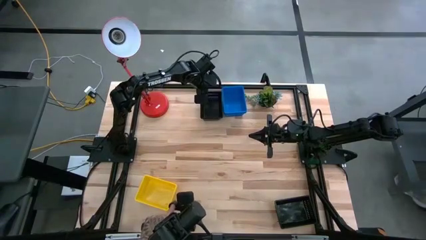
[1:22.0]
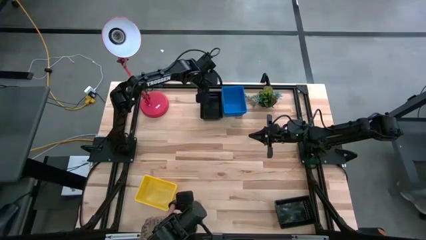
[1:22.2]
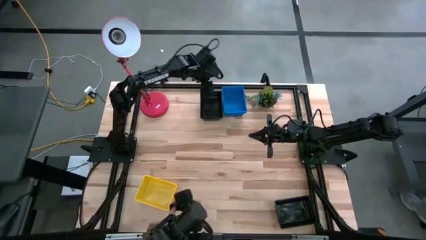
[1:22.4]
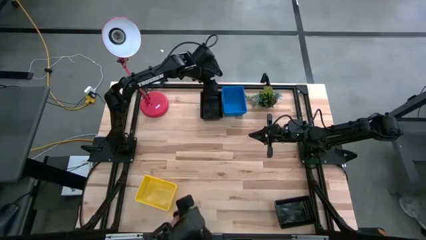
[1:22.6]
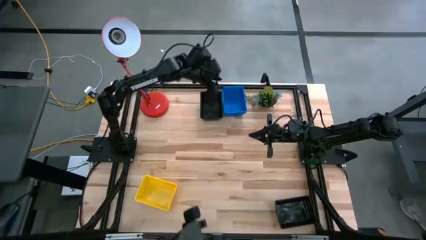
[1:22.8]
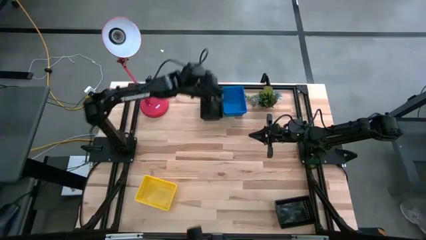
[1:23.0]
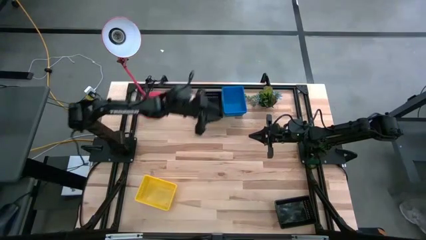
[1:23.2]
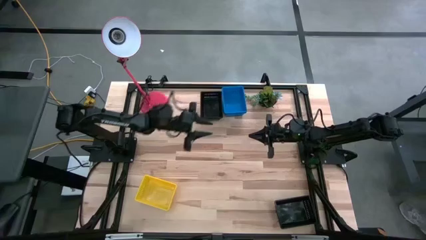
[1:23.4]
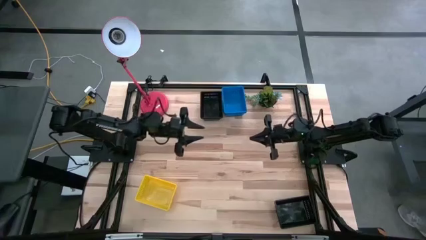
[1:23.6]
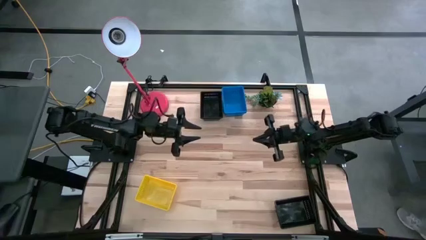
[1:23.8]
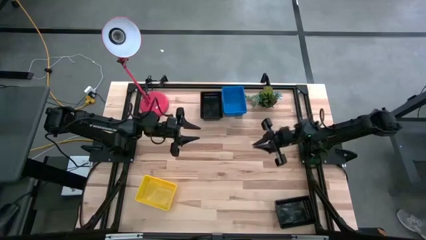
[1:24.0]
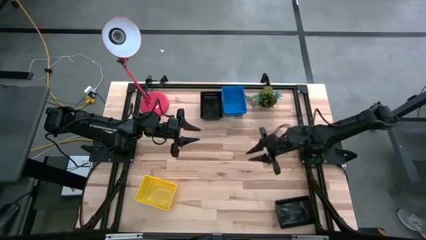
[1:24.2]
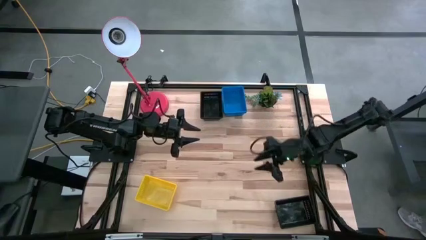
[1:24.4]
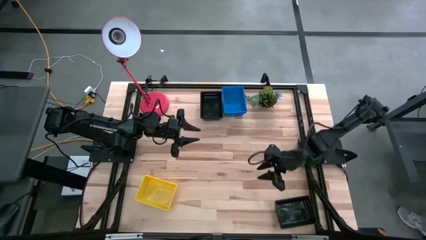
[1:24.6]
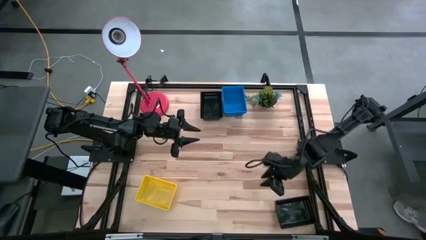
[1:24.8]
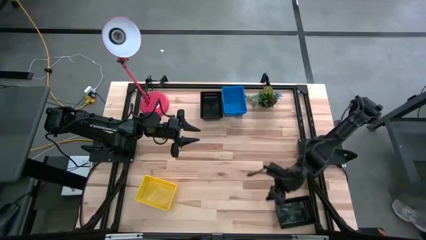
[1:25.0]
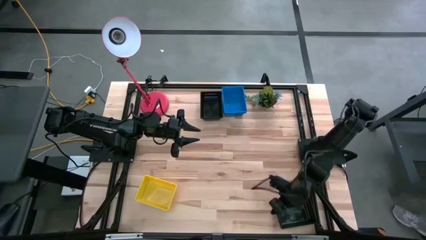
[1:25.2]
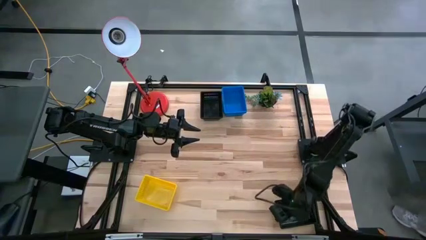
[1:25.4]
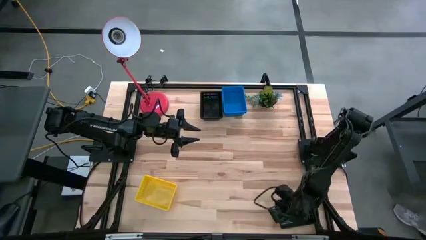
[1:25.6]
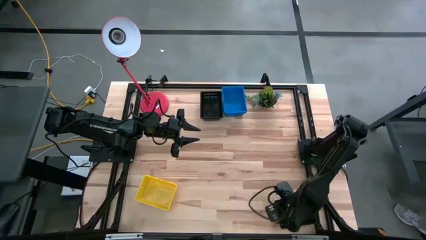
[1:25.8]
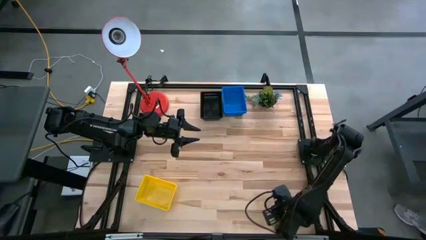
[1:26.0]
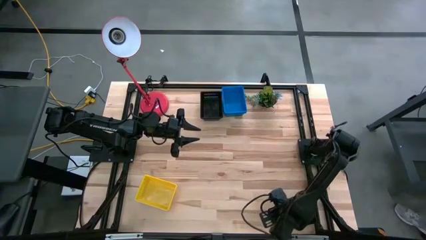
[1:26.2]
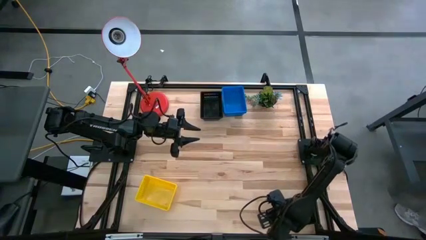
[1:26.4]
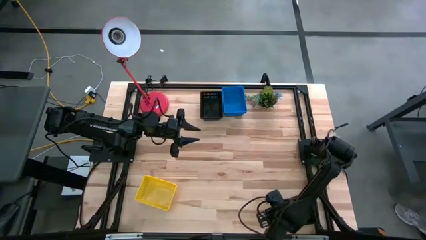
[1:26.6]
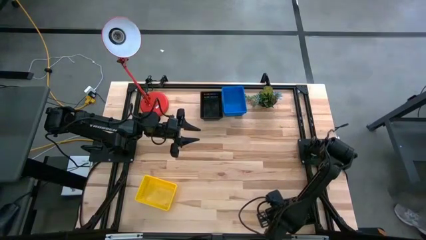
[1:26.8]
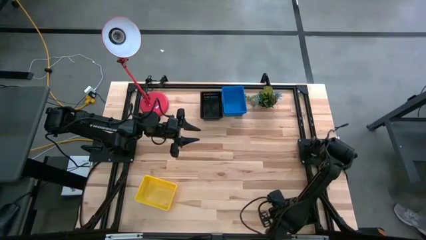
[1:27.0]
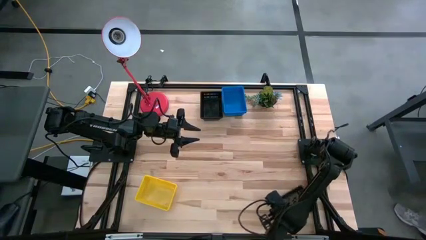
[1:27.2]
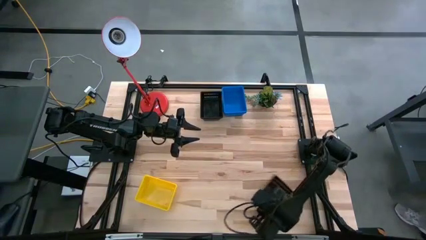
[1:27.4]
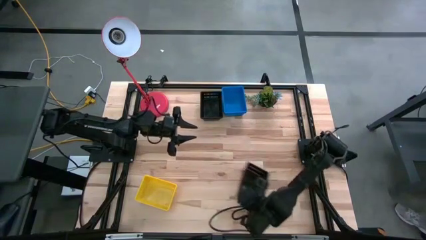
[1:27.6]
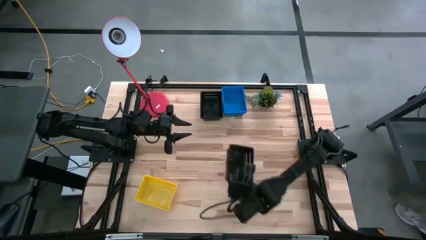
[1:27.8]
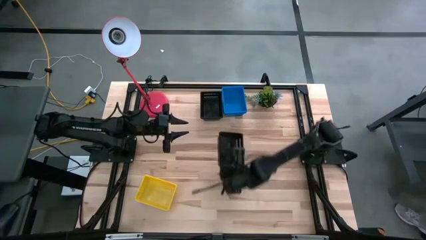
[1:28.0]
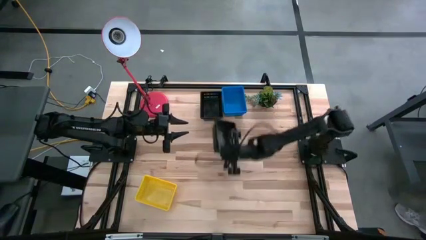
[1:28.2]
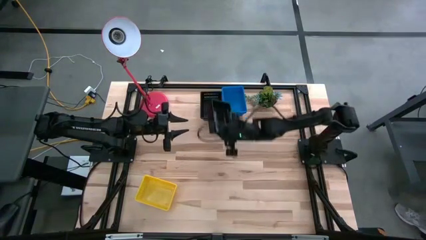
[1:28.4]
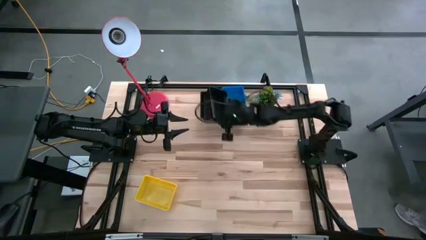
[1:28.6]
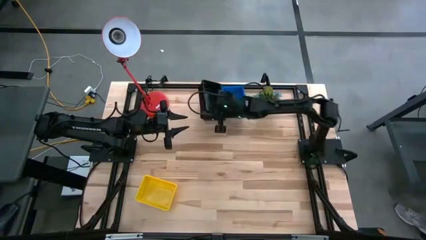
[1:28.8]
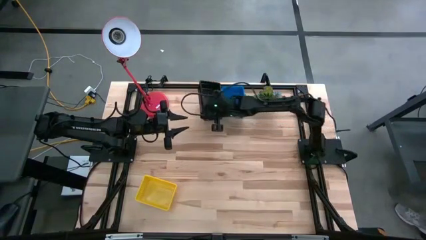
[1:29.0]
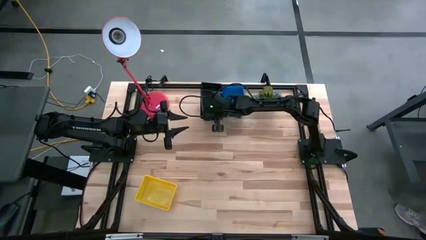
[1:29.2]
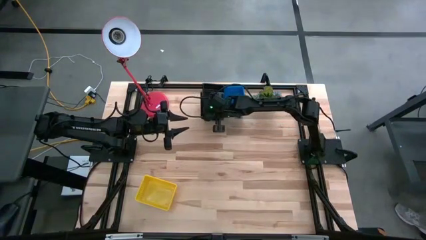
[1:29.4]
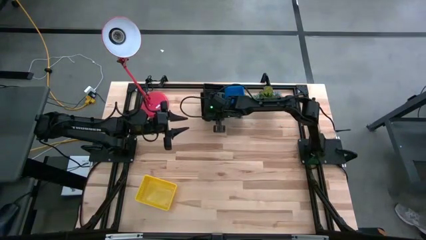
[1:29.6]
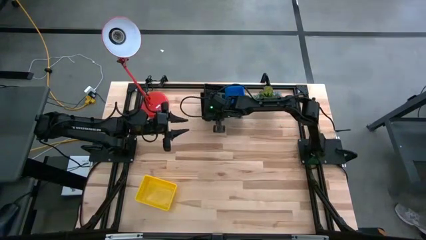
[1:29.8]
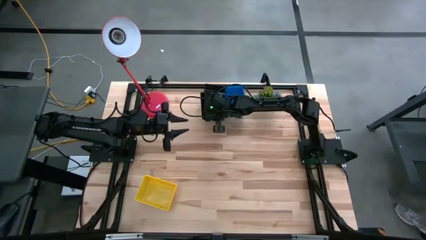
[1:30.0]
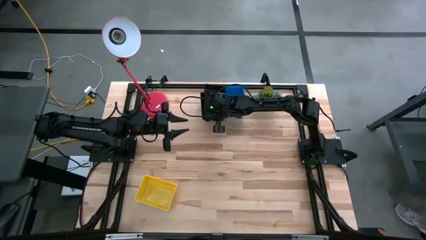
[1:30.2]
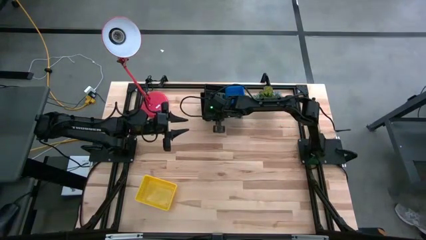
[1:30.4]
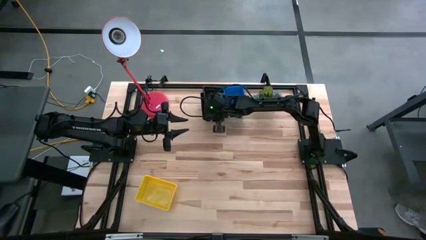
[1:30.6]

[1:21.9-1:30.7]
Stack the bottom black bin on the black bins

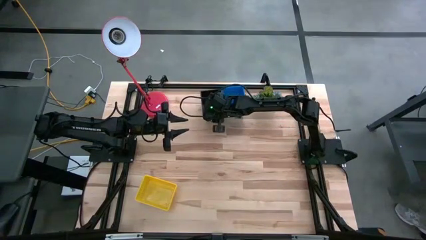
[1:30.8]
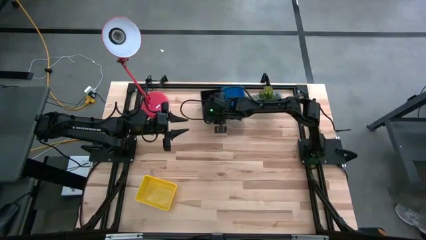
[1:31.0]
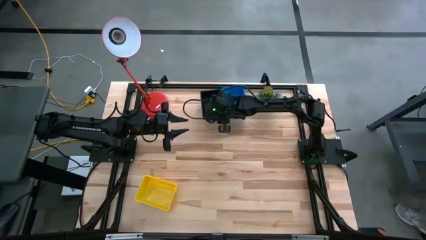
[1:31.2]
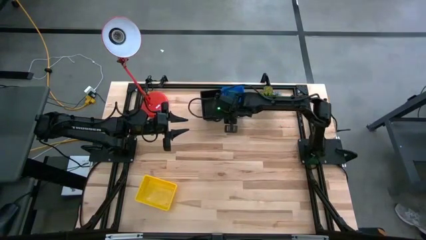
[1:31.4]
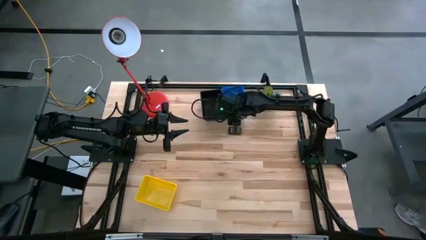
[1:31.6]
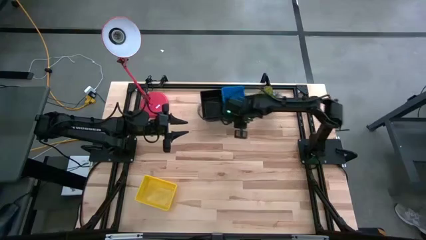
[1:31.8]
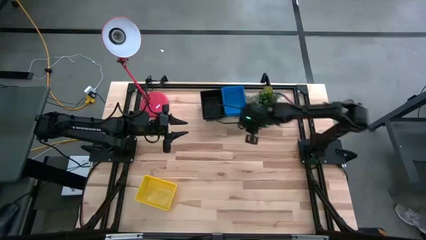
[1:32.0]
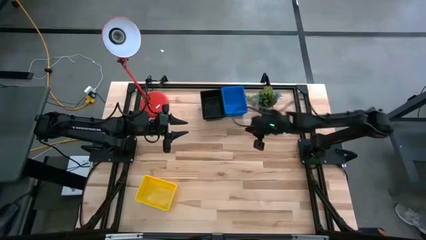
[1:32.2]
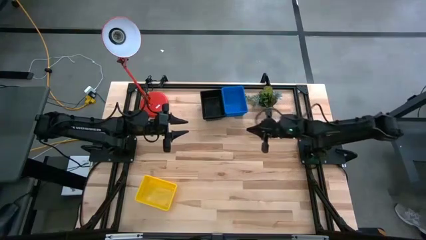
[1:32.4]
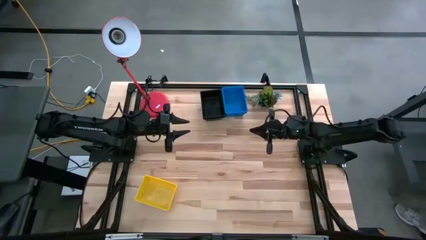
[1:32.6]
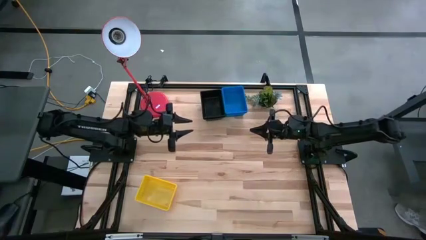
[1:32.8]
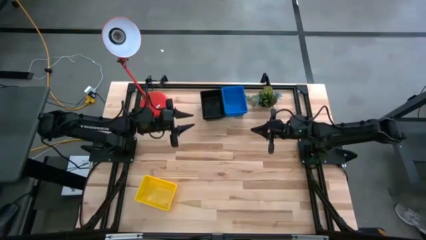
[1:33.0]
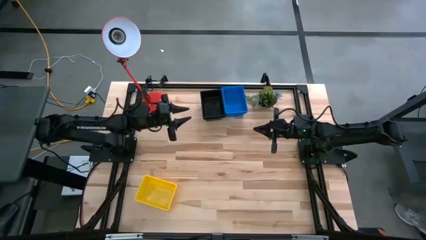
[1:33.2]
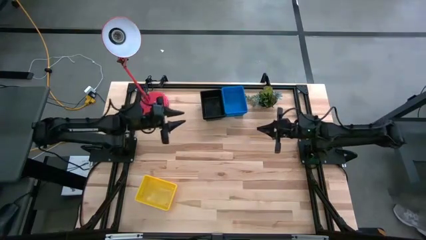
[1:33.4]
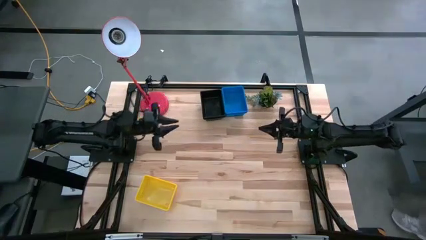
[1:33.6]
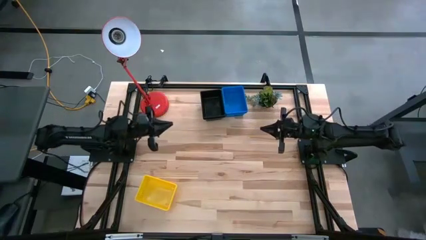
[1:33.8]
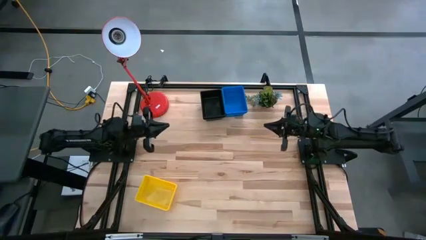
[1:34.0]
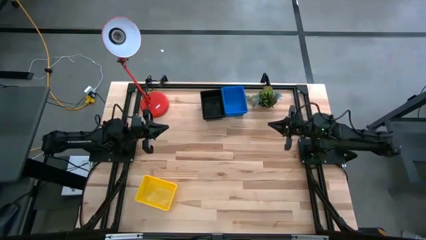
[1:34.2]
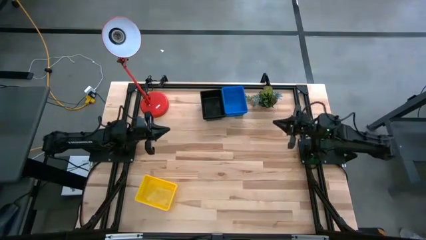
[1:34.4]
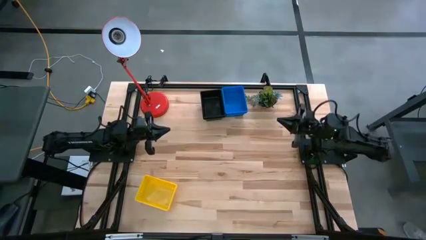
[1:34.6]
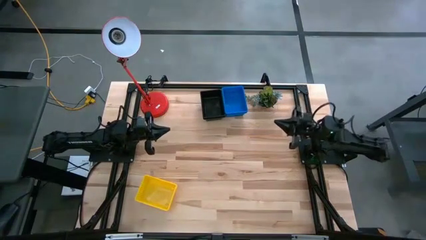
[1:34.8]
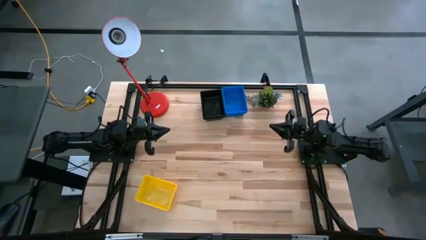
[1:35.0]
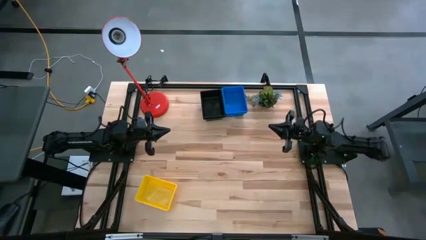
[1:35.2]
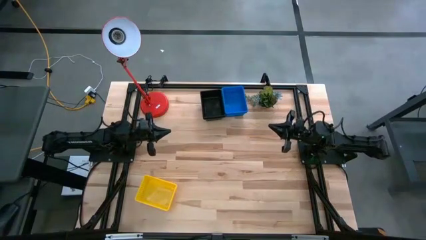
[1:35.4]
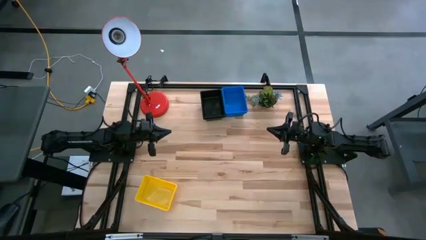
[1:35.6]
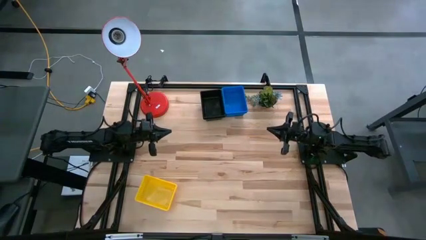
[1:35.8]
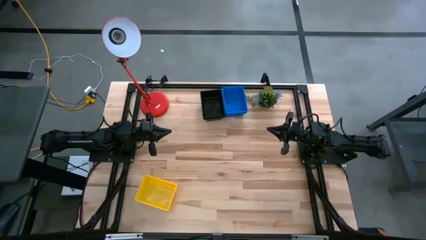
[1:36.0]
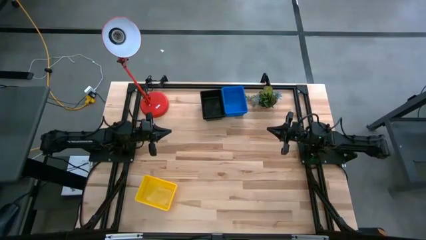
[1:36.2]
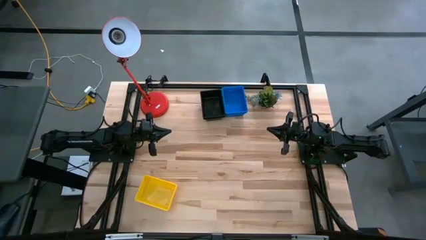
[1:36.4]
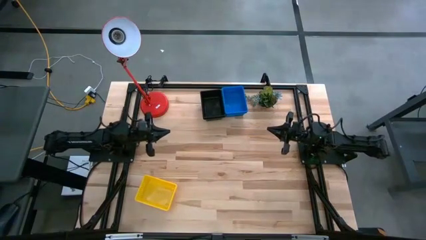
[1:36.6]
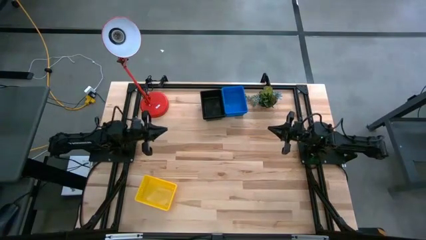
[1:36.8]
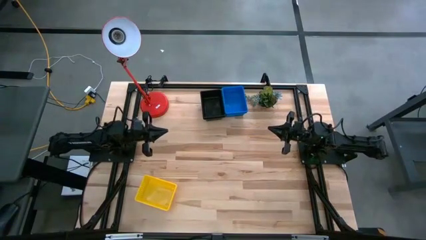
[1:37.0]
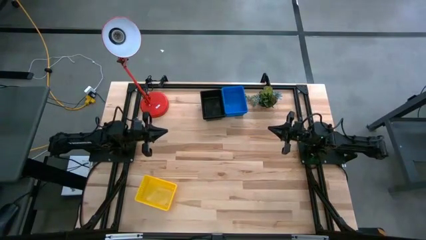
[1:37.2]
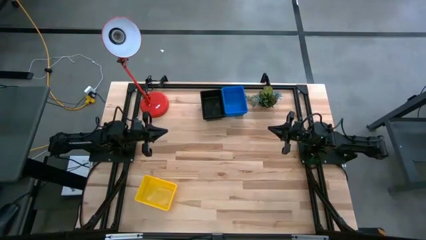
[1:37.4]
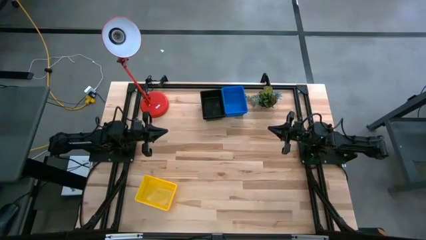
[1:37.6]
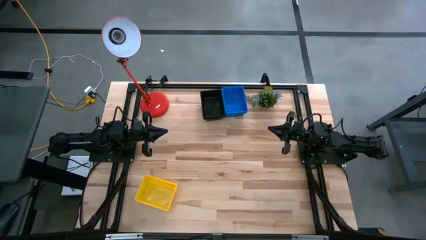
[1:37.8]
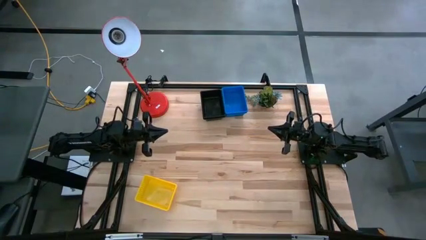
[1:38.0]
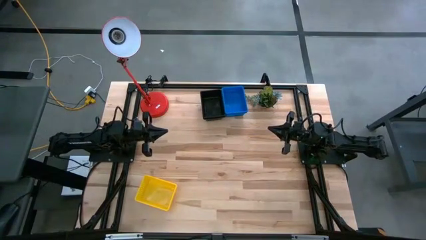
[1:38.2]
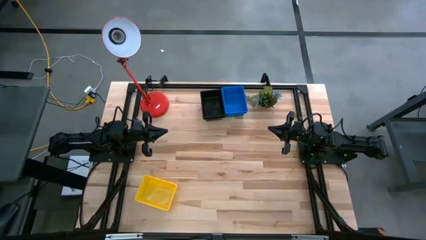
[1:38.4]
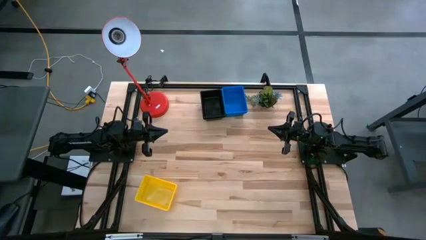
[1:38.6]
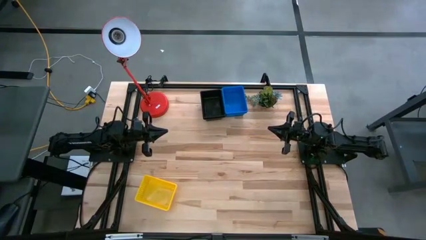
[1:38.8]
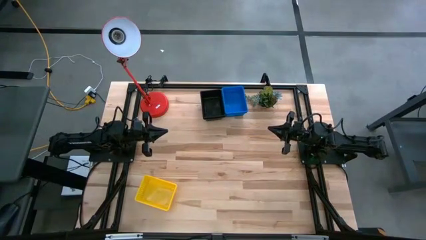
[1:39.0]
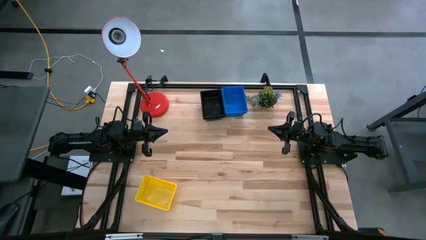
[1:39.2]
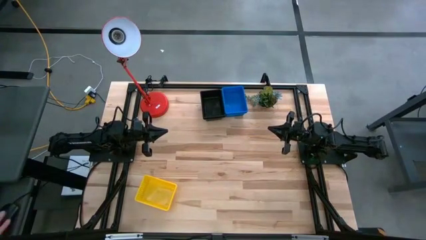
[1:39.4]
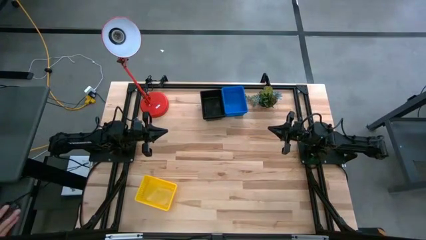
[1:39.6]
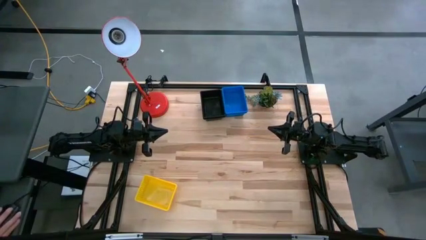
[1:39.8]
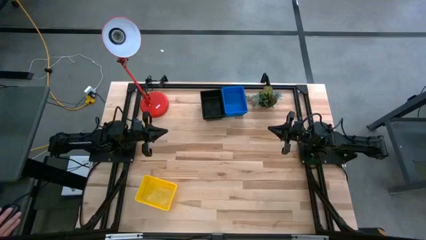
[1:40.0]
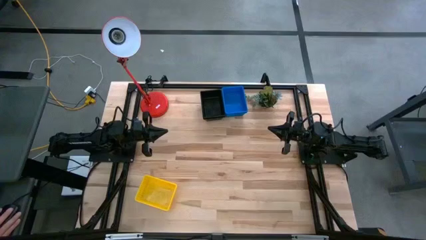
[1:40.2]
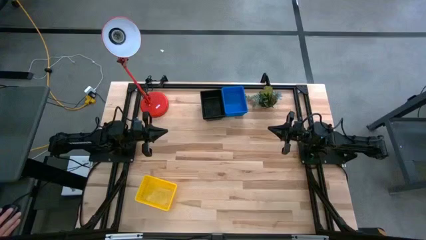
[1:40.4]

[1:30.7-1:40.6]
Return to Home Position
